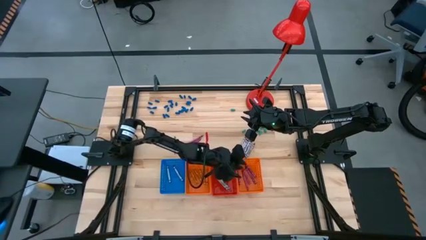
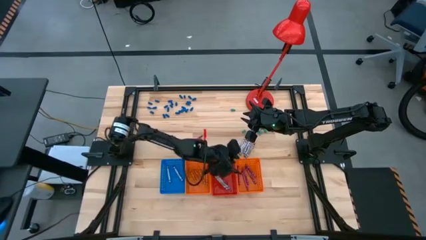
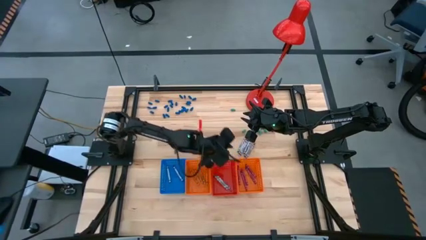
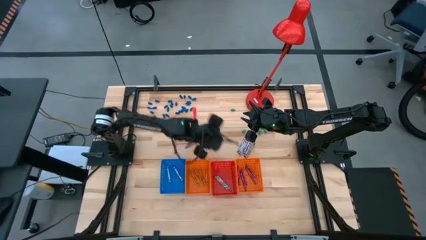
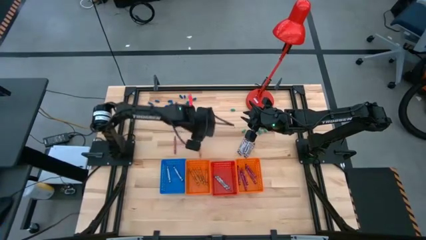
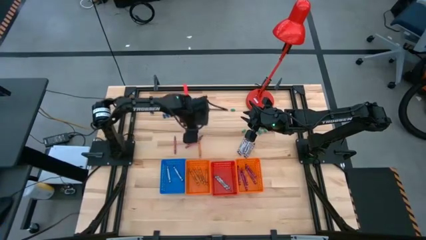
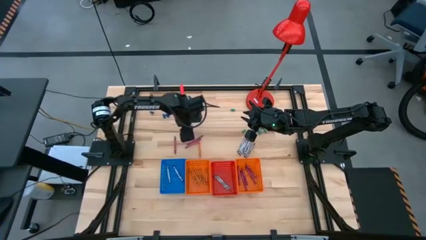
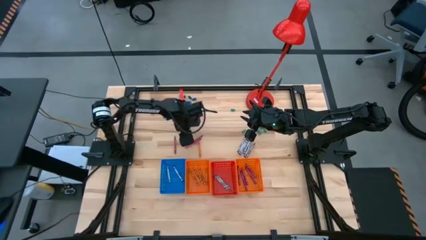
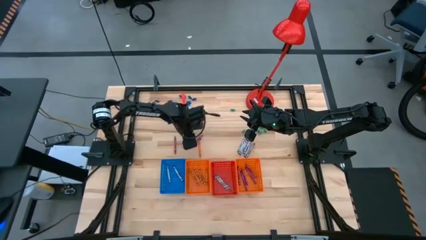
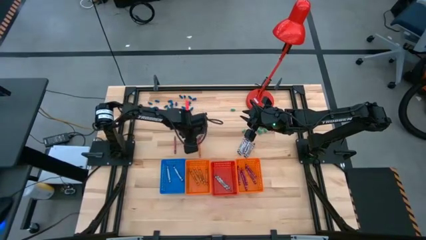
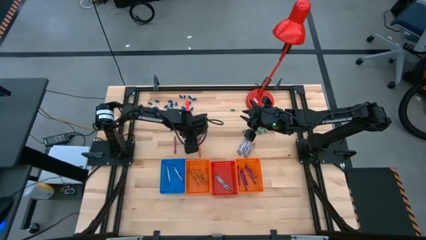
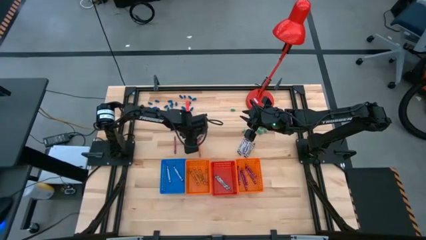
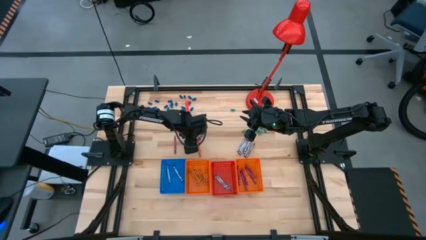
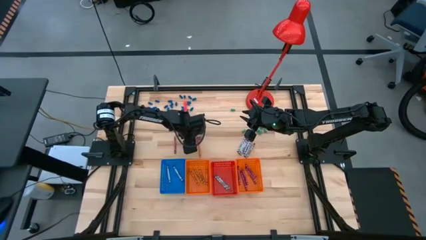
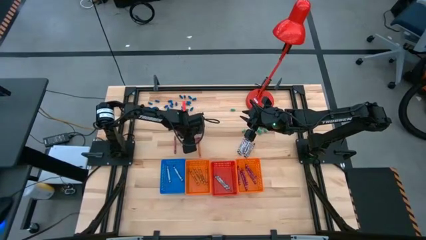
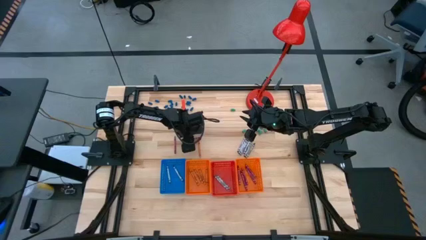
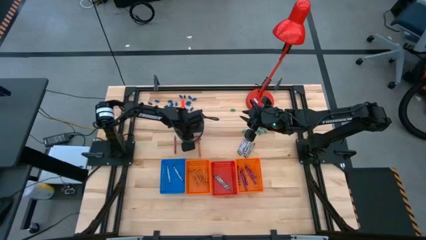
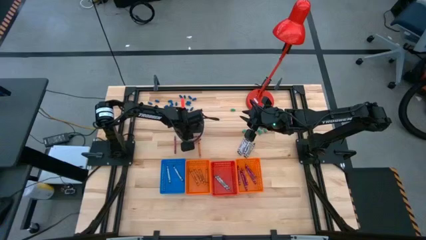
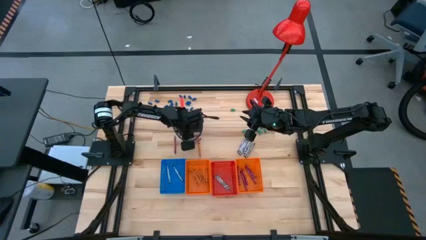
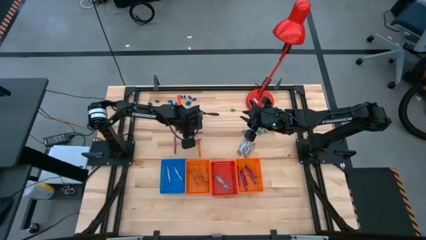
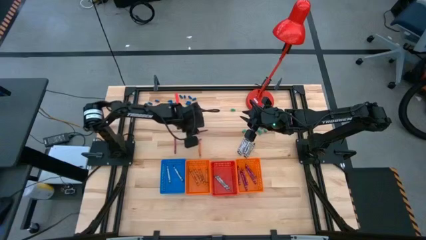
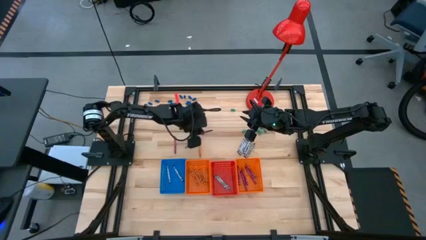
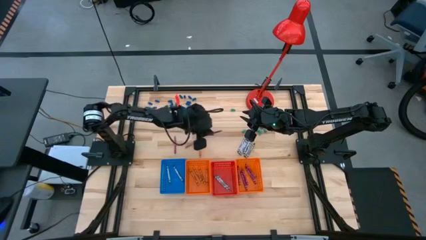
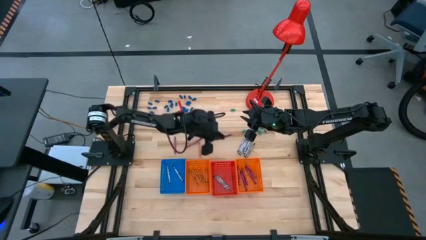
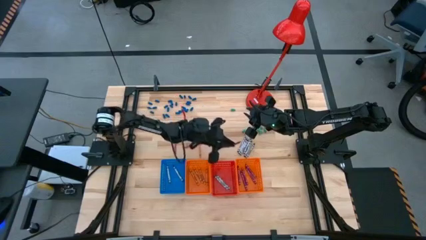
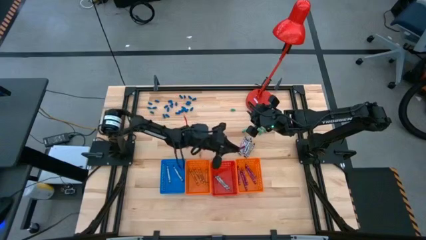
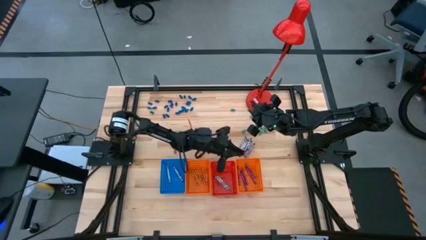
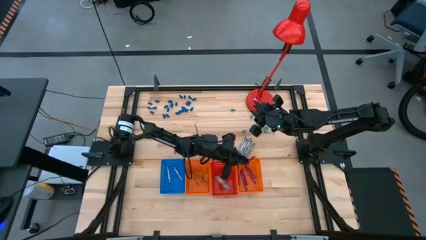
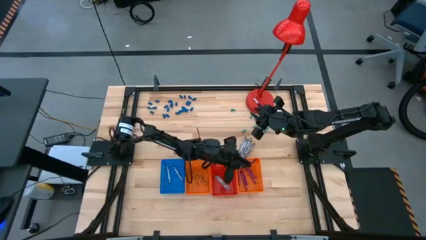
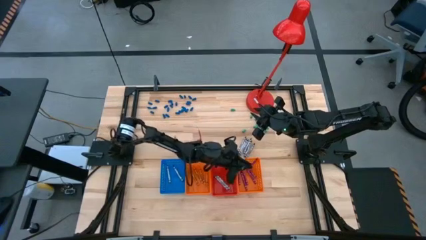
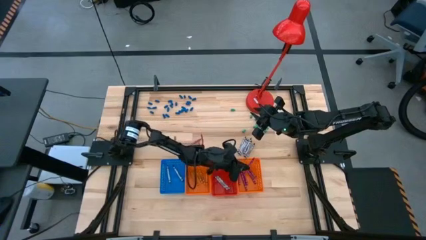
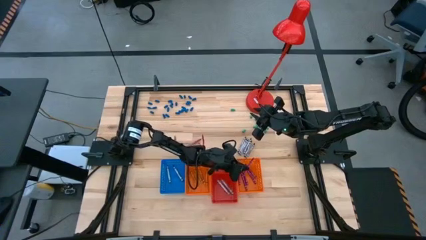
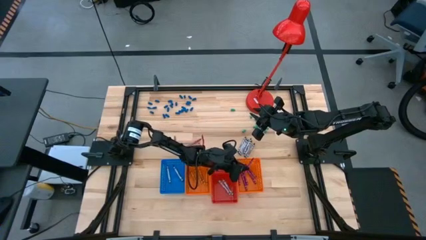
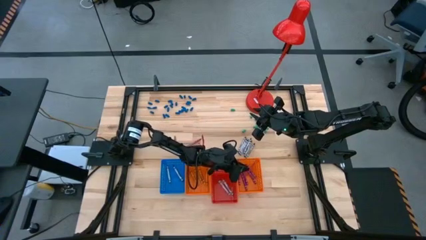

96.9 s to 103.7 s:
Task: Sort crayons
Put the red crayon into the right orange bin

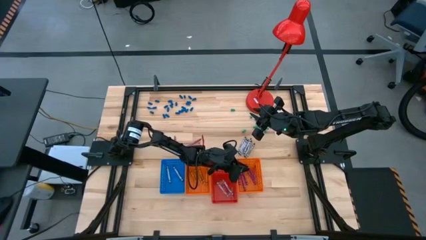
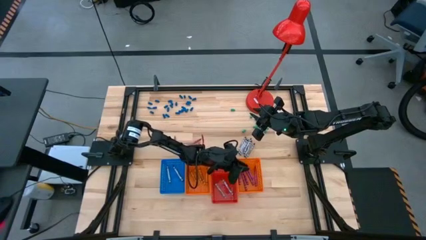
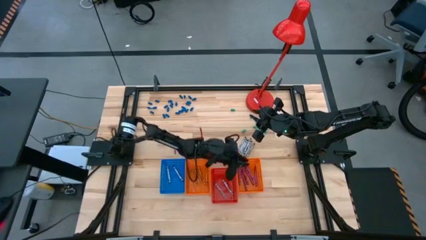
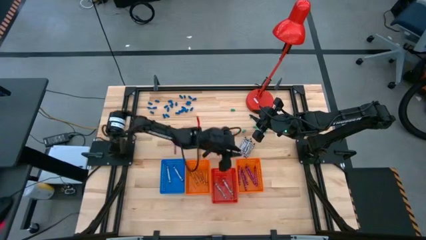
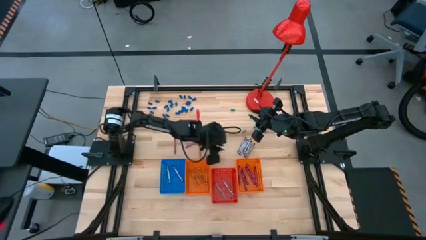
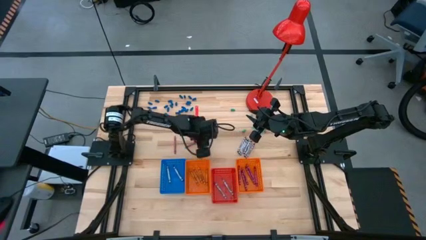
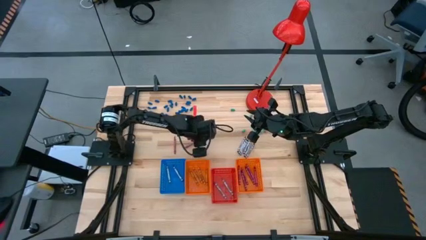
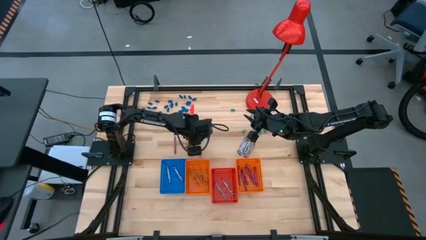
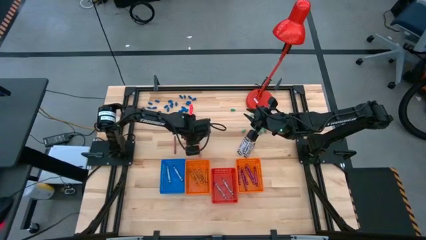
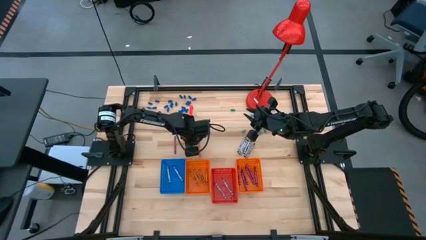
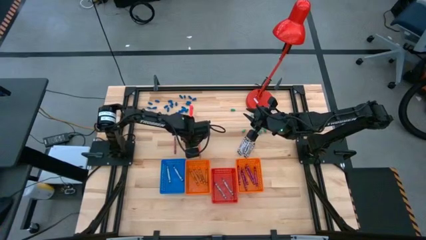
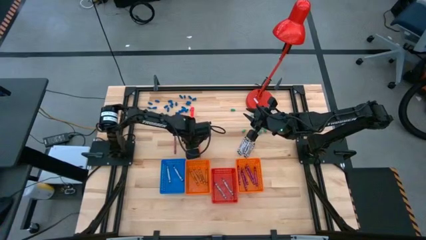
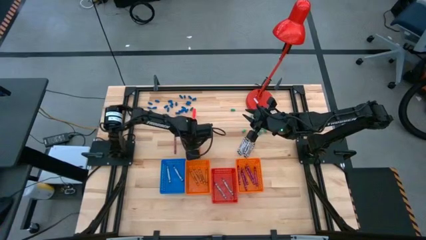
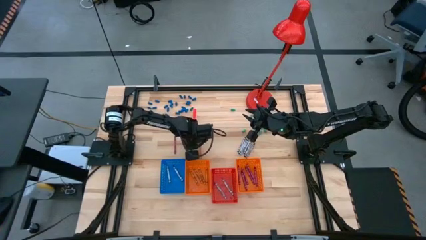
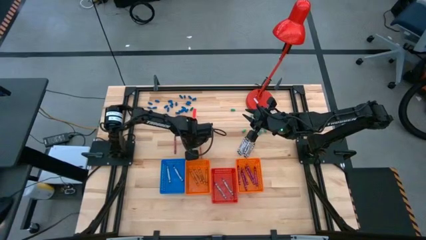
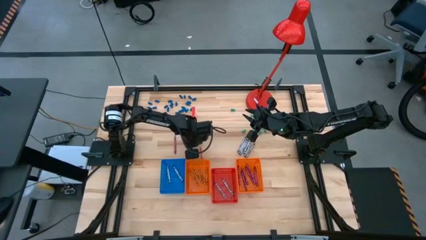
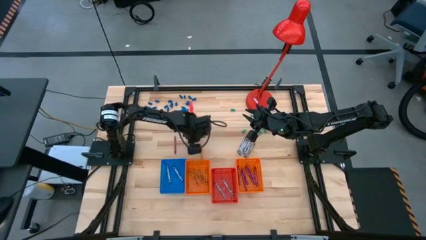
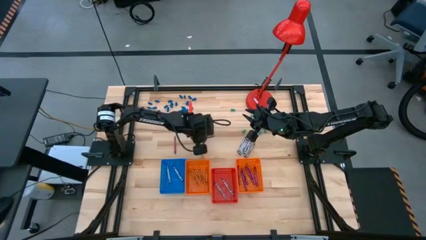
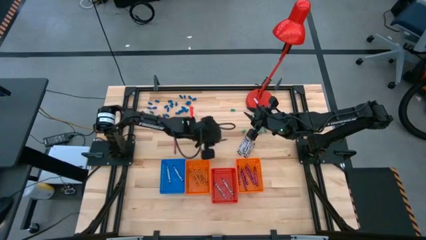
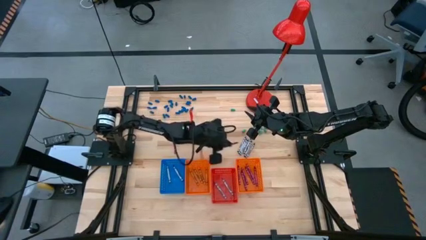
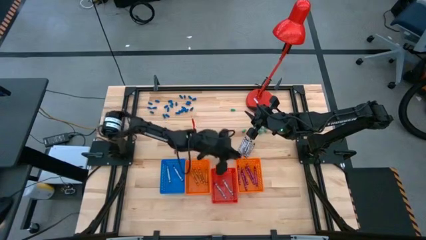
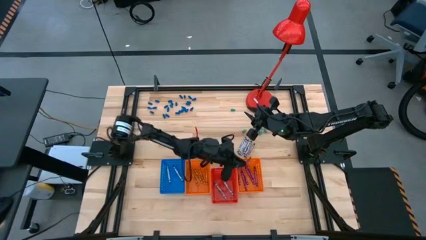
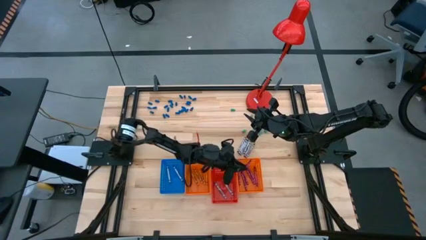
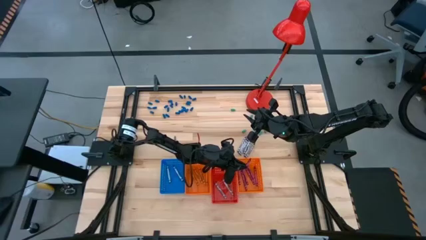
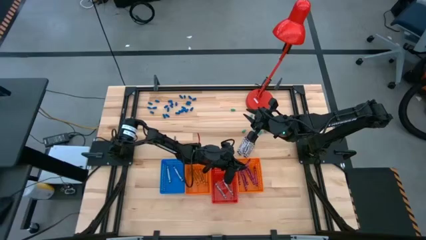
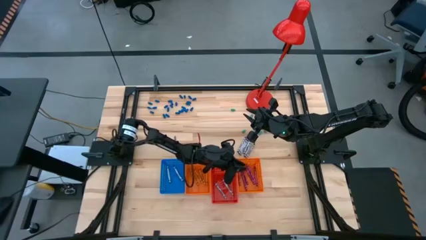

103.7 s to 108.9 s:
Put the red crayon into the right orange bin

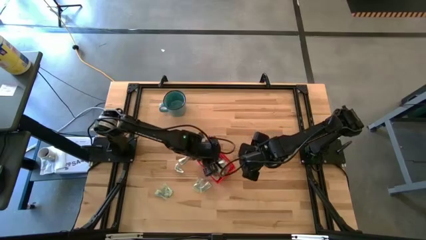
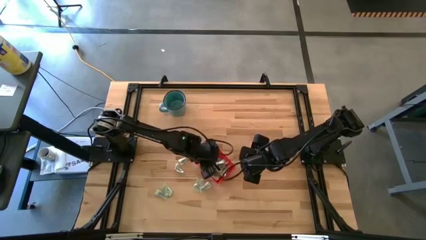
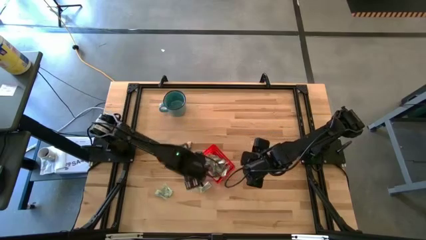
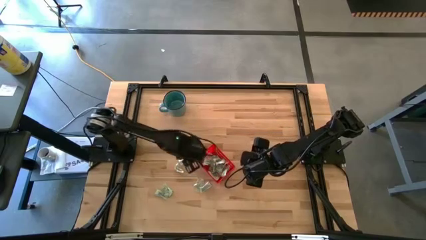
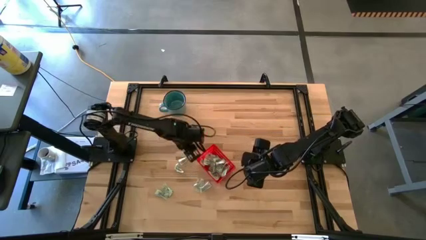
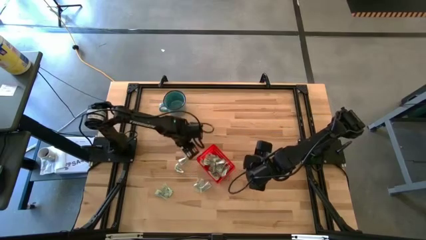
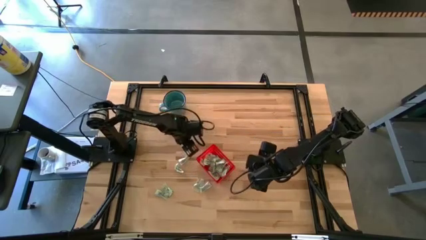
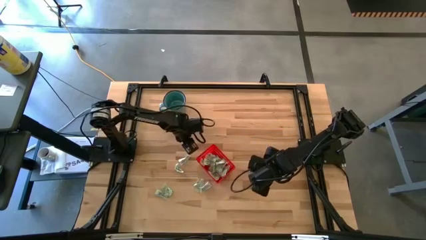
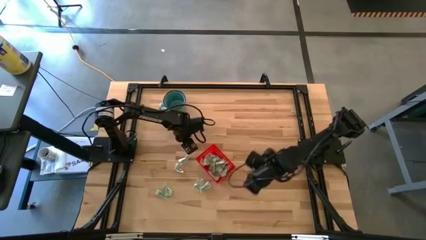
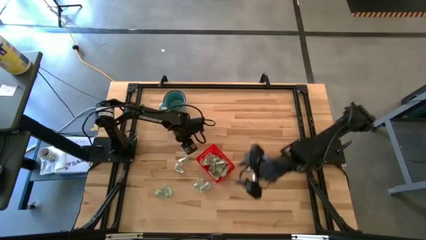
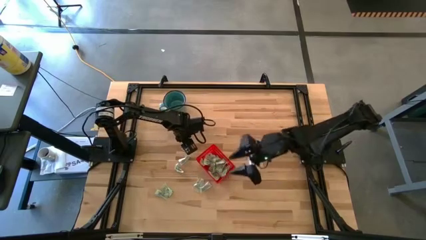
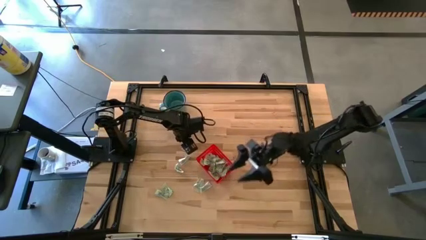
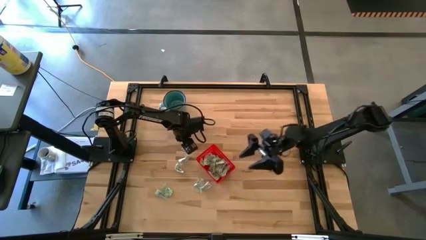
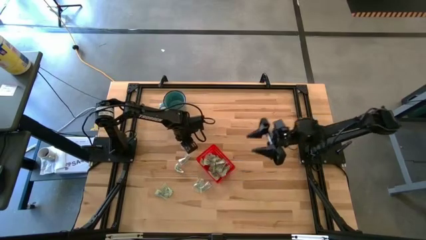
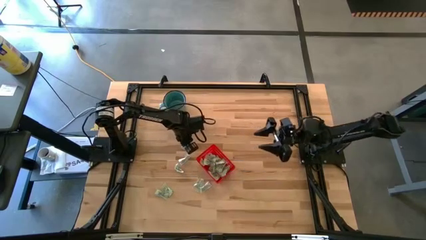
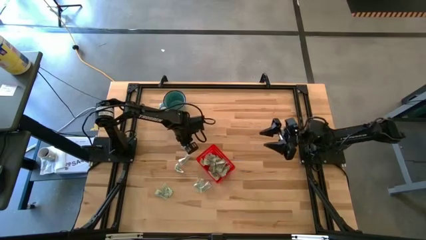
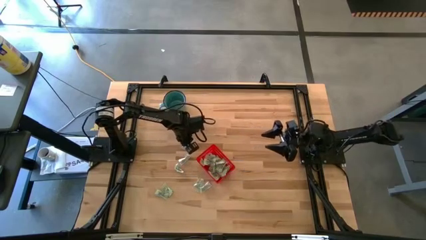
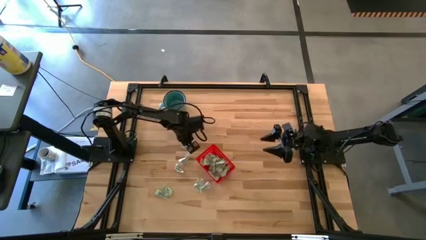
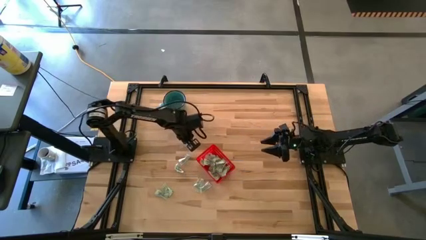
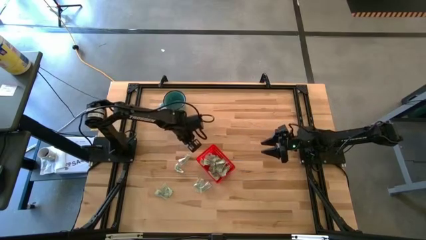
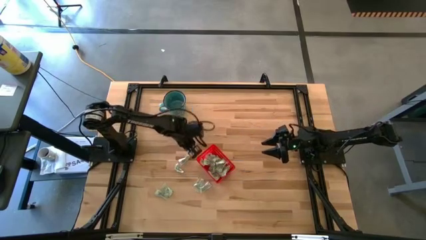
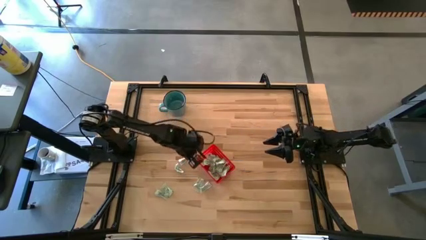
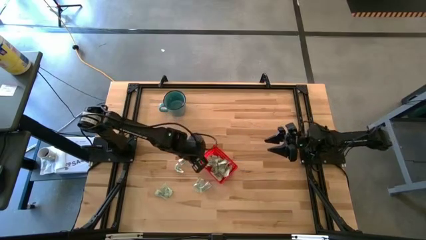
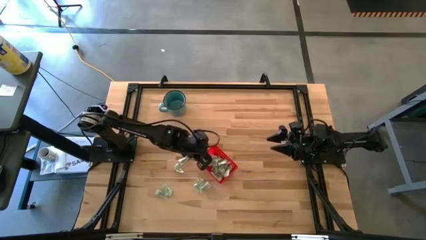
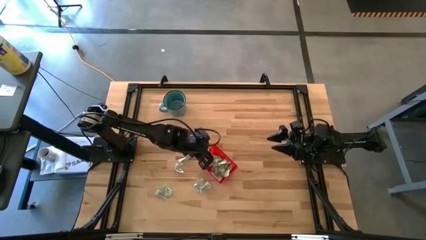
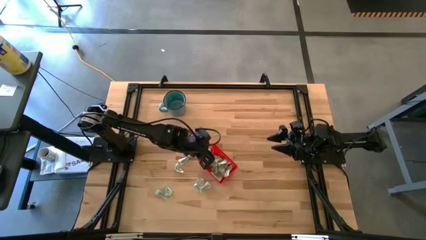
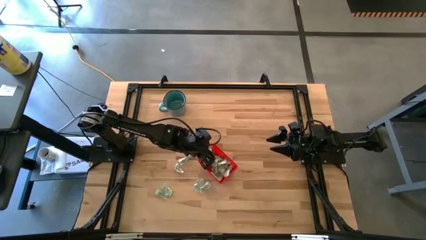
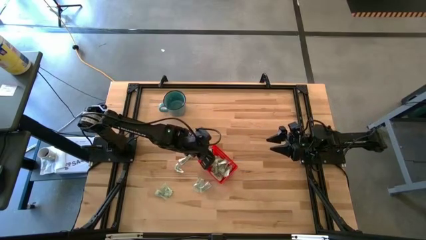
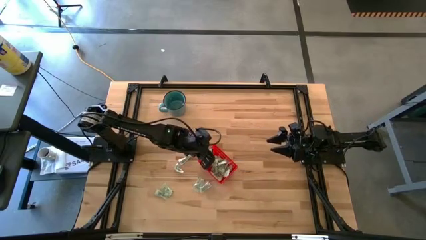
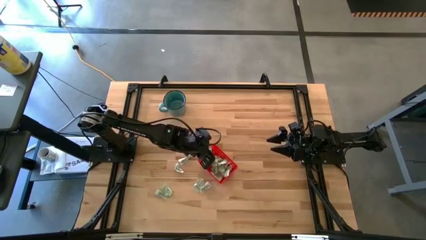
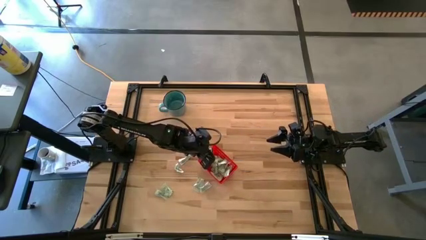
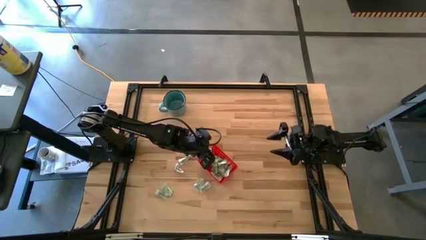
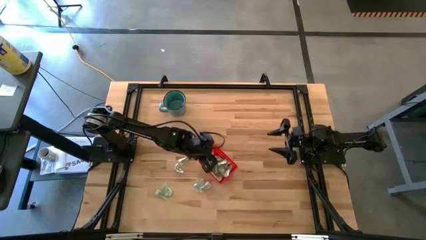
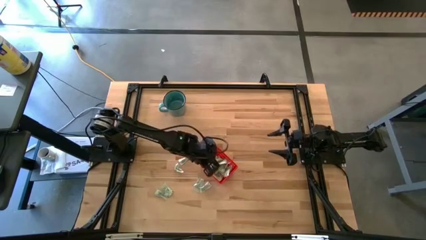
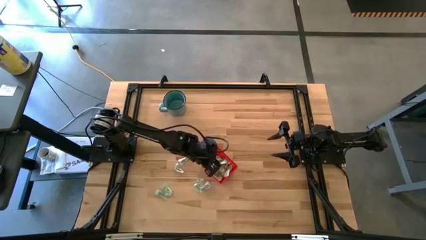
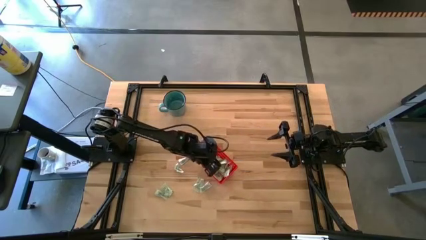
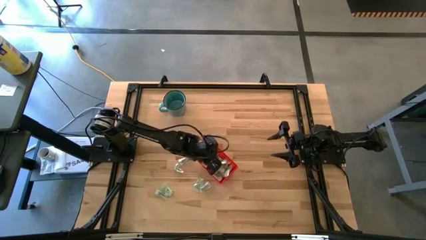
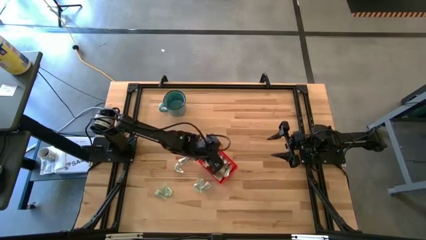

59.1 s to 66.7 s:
Task: Pick and place Stevia / Truvia into bins
Put the green stevia packet into the basket
